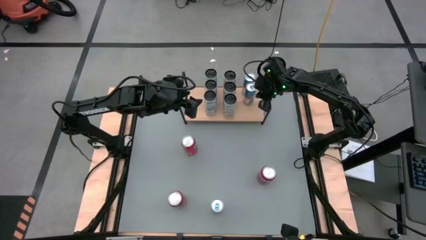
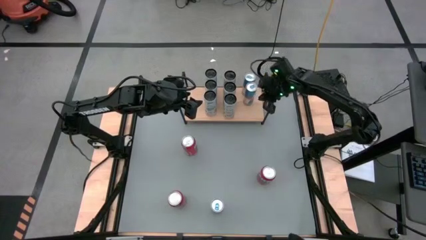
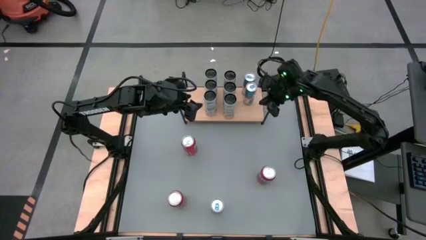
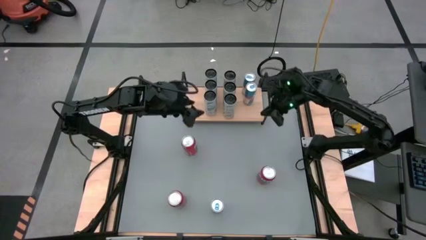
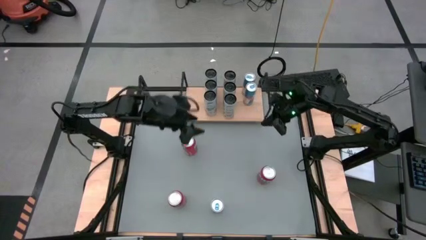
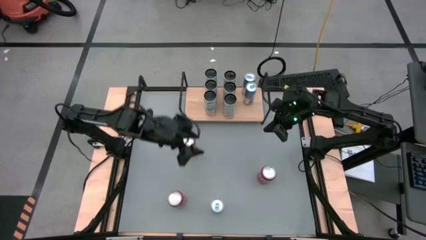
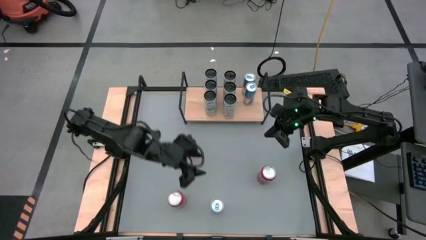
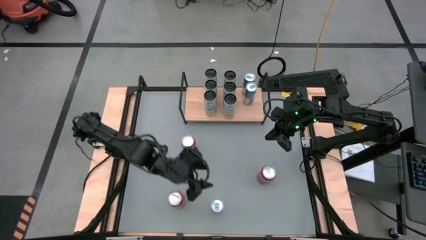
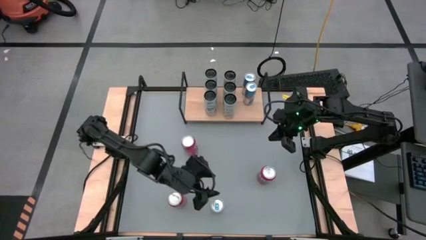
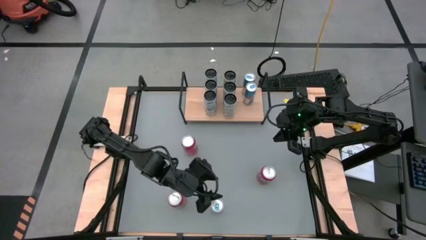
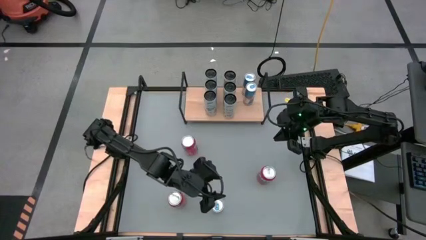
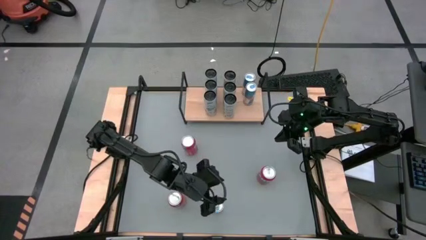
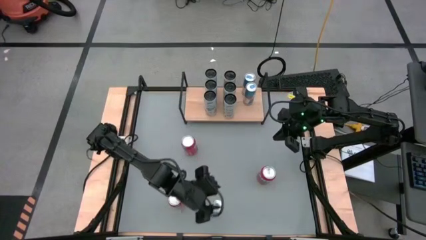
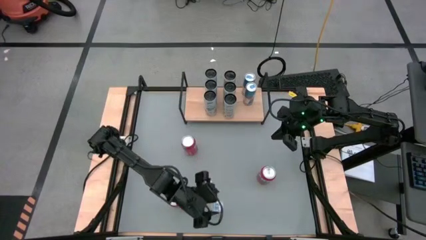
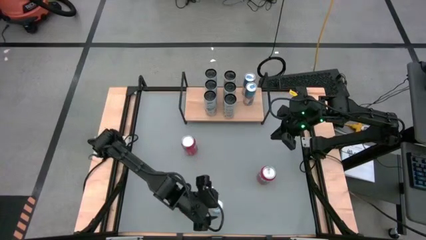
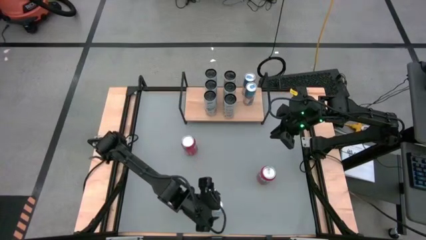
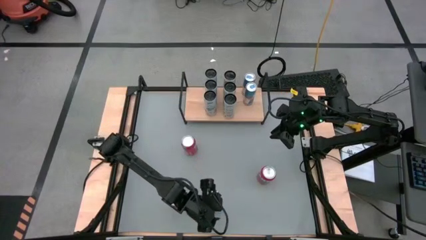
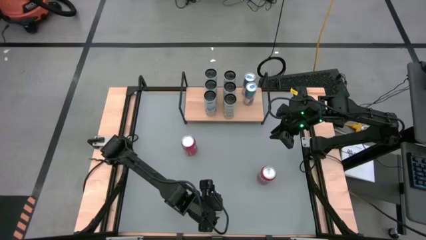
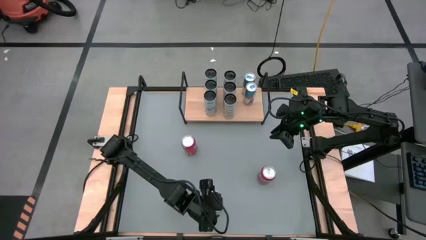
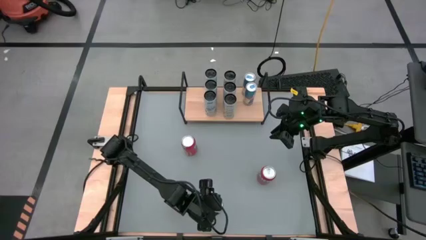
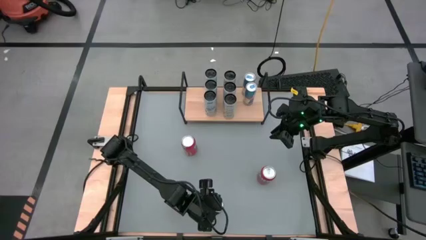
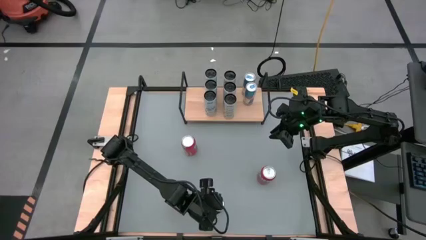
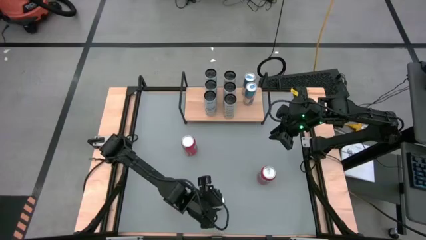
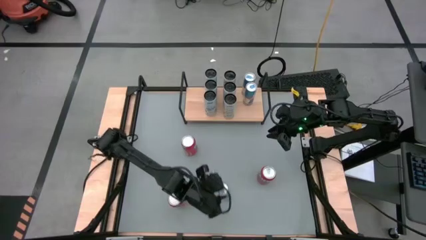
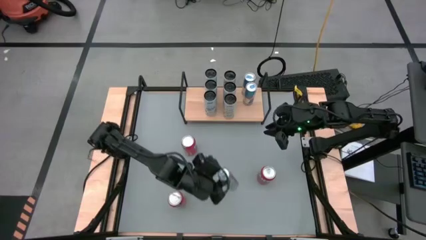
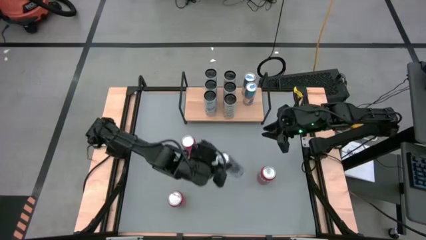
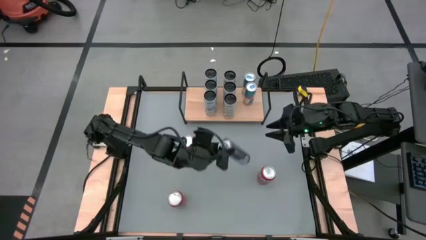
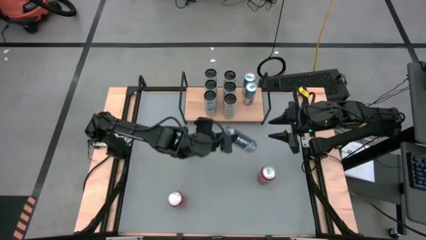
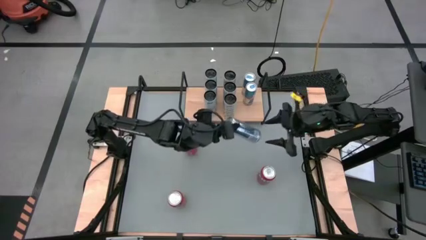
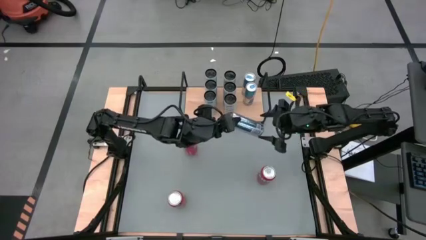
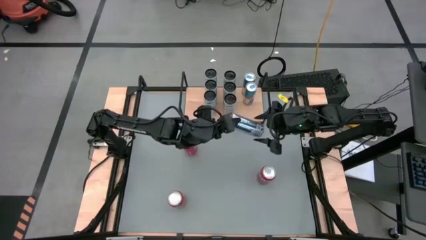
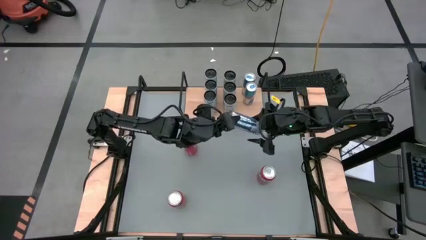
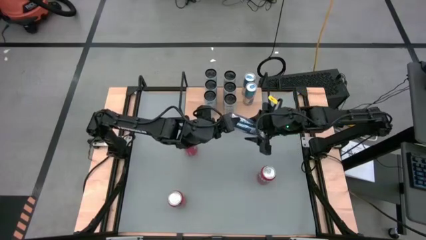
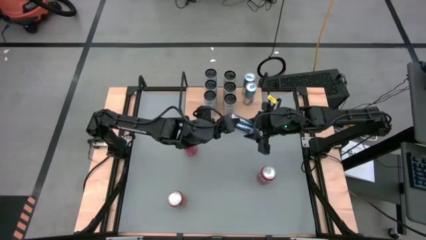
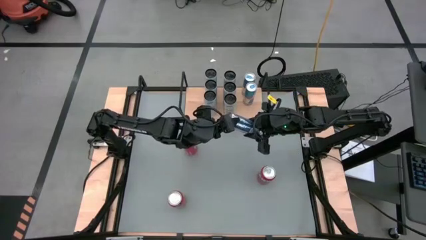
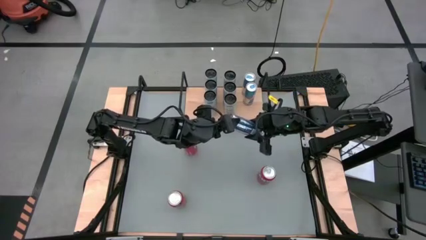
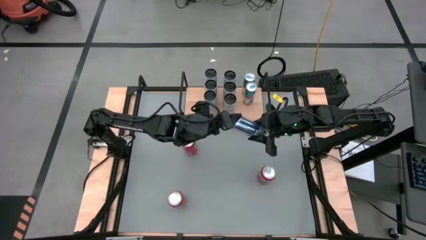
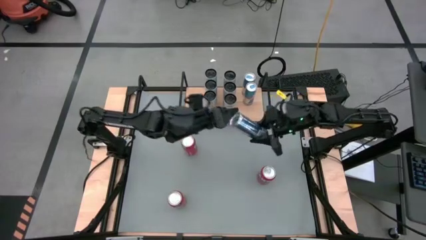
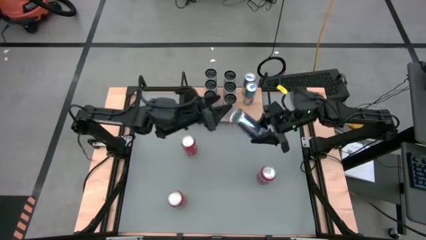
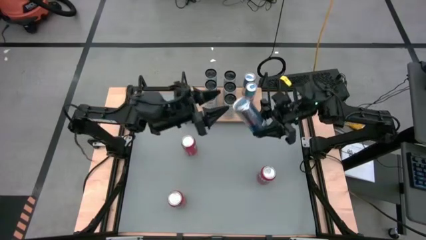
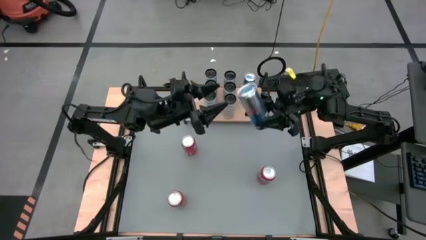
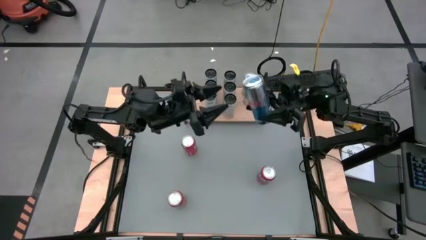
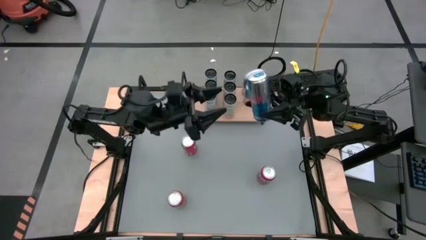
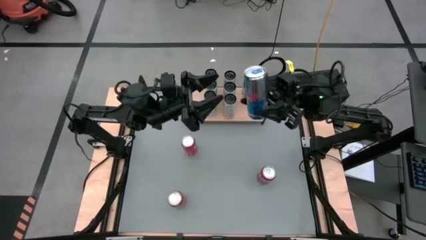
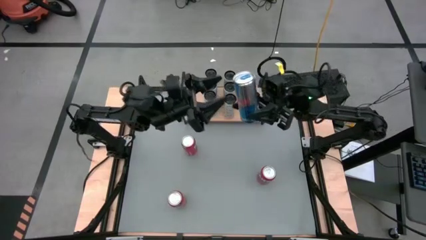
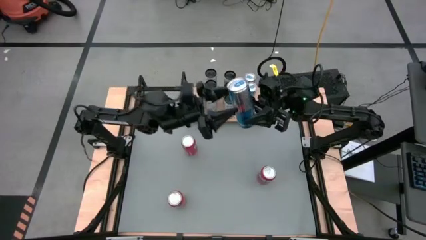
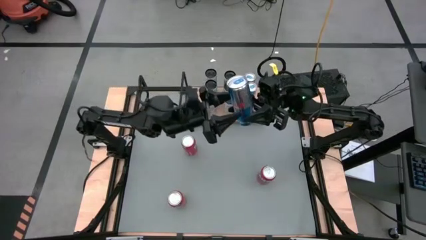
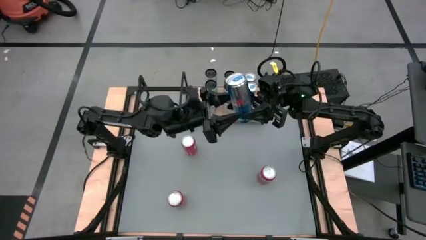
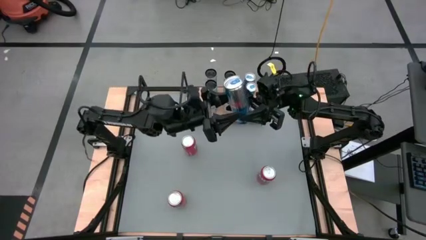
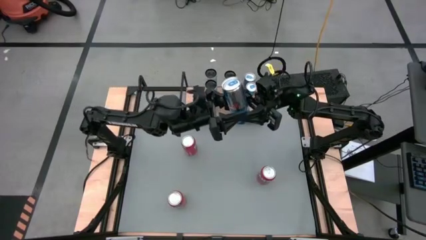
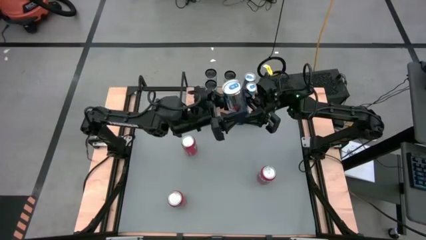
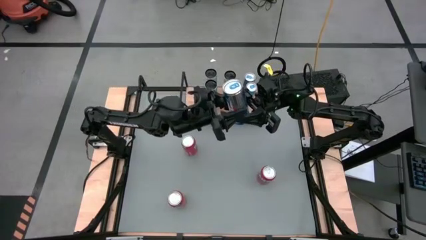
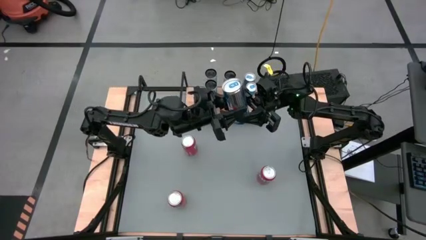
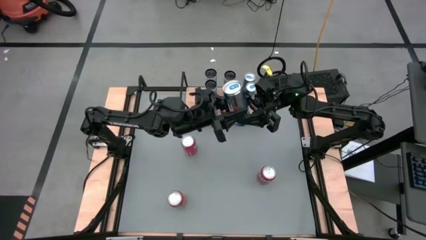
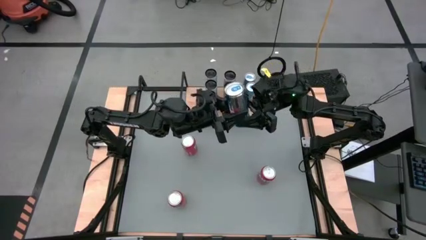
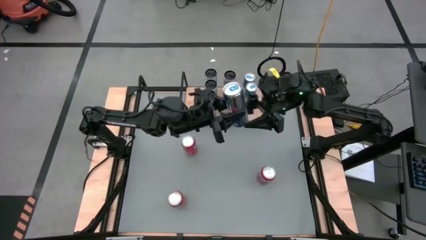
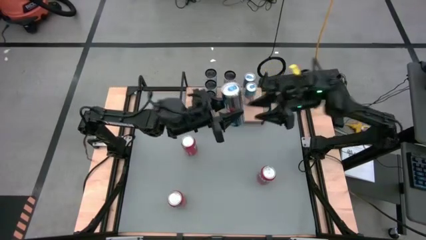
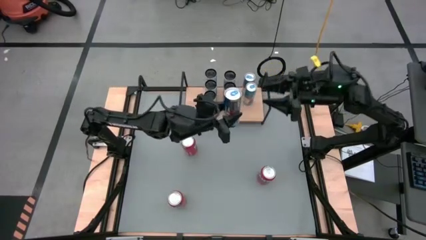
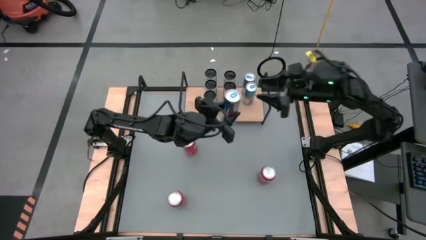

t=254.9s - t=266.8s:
Task: Place canned beverage on shelf
Put the blue soda can aligned with the other blue soda can on the shelf
